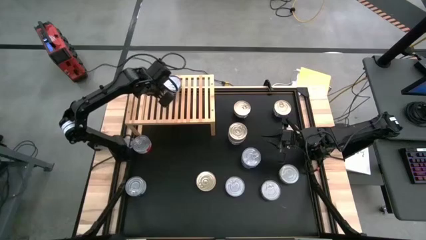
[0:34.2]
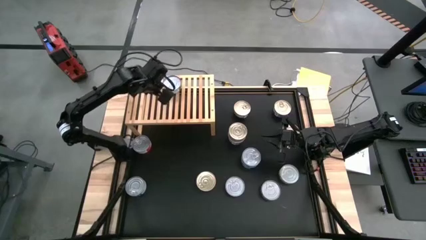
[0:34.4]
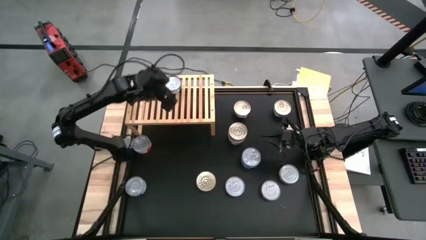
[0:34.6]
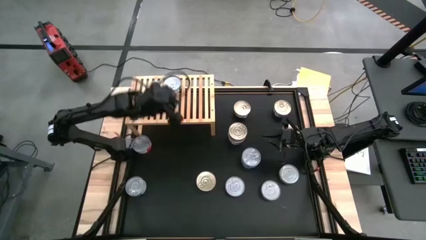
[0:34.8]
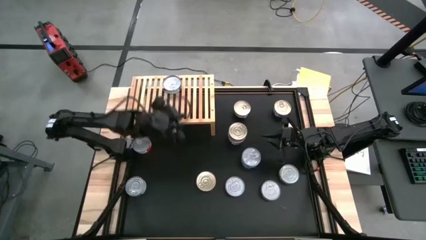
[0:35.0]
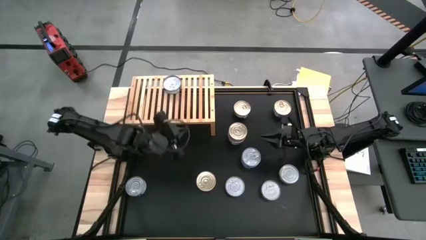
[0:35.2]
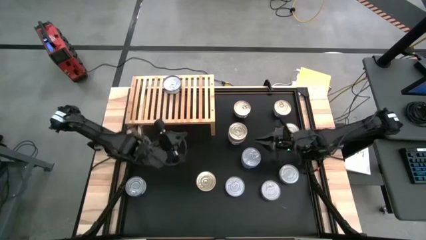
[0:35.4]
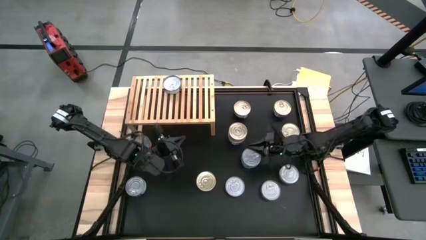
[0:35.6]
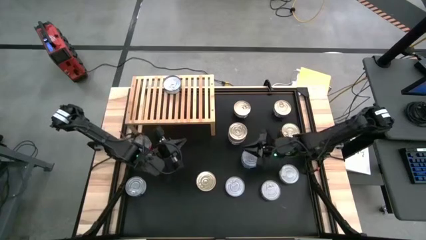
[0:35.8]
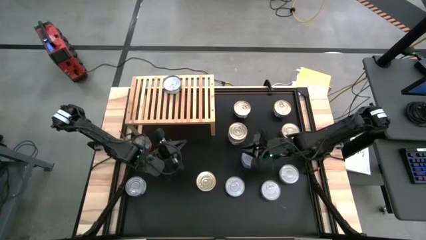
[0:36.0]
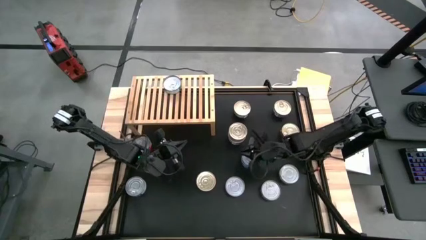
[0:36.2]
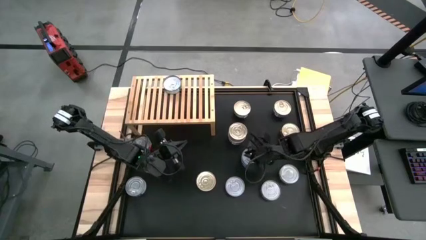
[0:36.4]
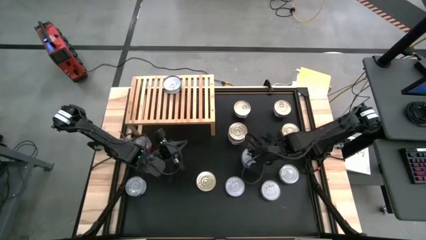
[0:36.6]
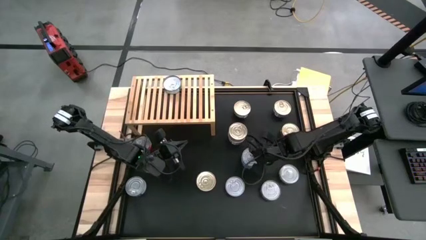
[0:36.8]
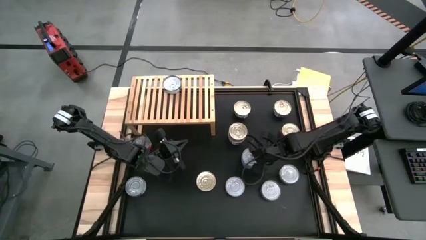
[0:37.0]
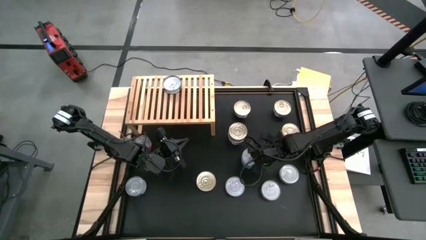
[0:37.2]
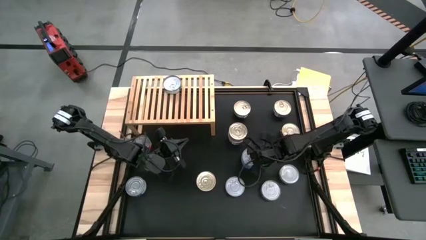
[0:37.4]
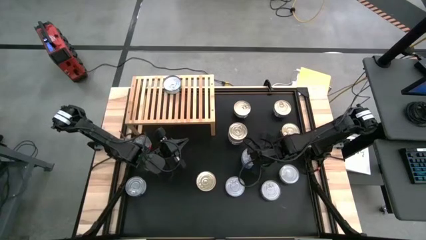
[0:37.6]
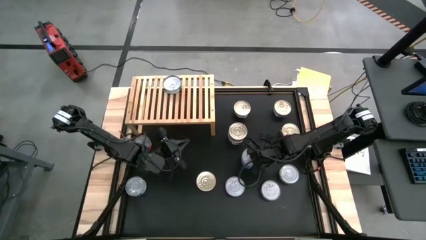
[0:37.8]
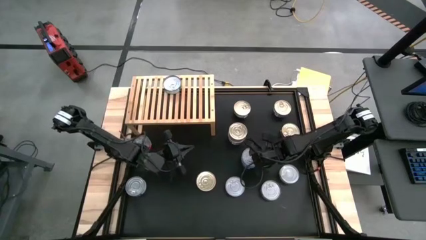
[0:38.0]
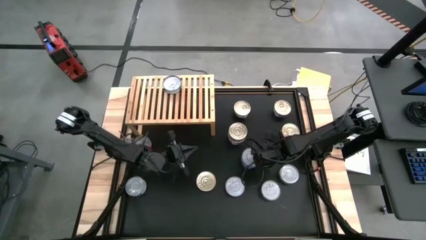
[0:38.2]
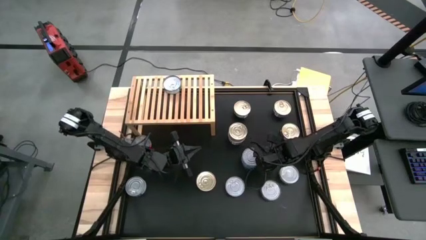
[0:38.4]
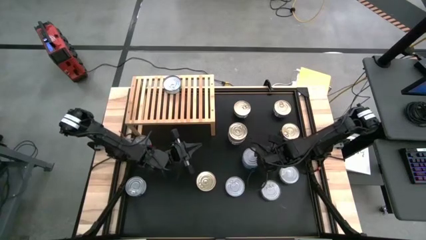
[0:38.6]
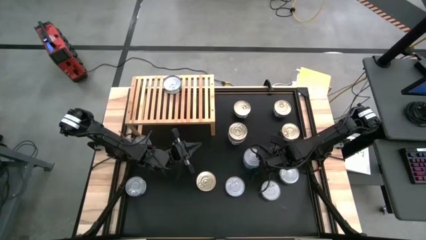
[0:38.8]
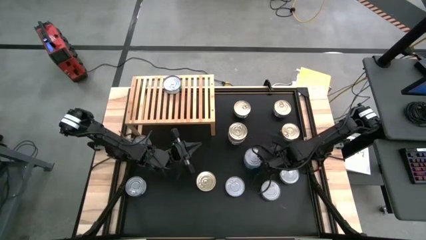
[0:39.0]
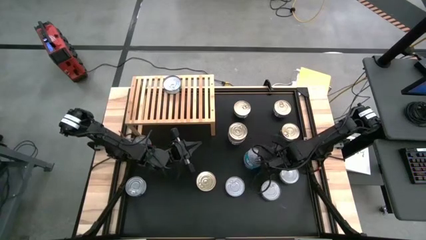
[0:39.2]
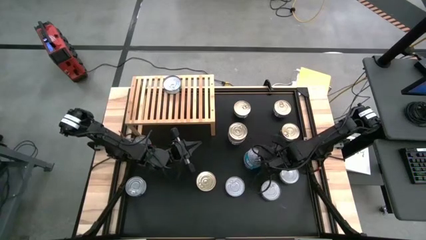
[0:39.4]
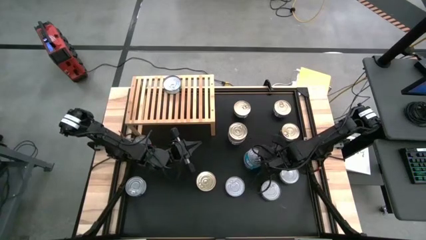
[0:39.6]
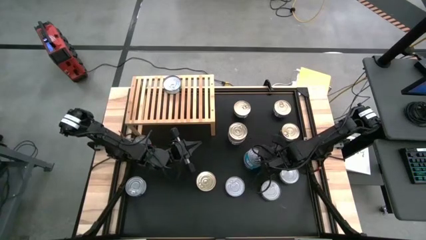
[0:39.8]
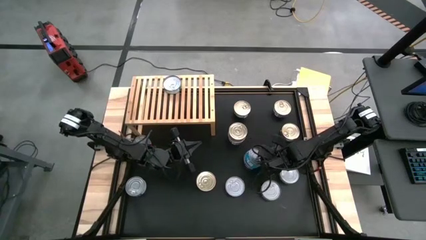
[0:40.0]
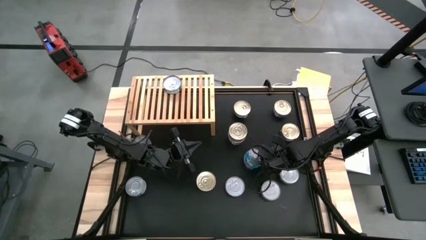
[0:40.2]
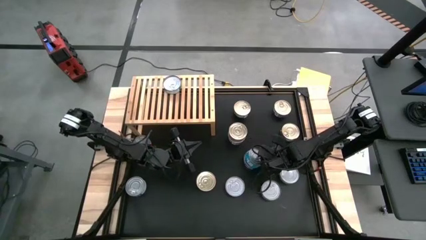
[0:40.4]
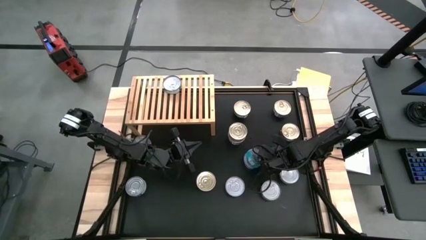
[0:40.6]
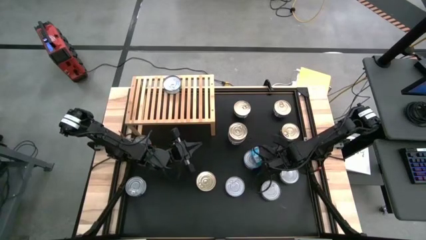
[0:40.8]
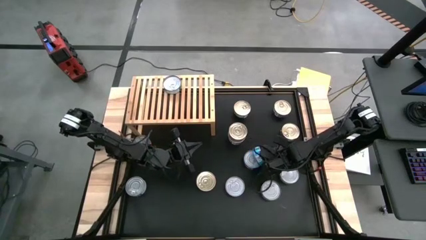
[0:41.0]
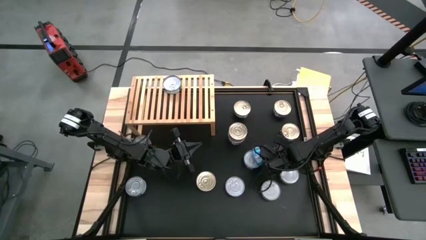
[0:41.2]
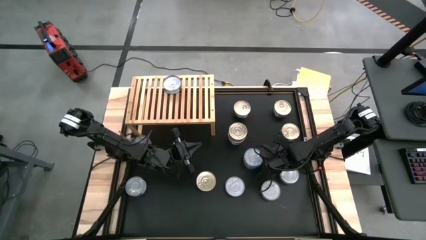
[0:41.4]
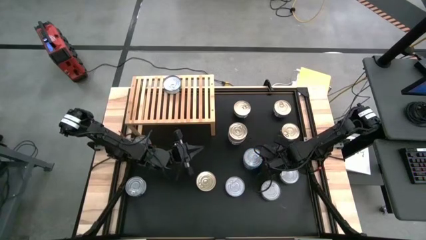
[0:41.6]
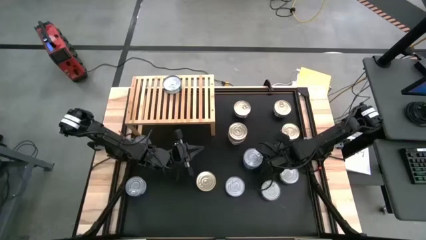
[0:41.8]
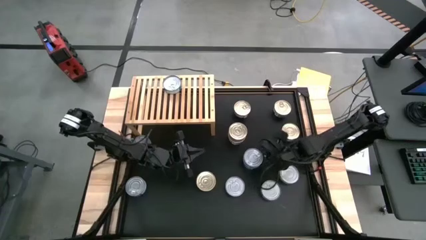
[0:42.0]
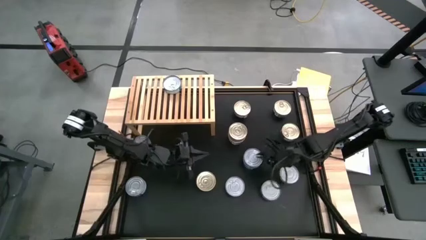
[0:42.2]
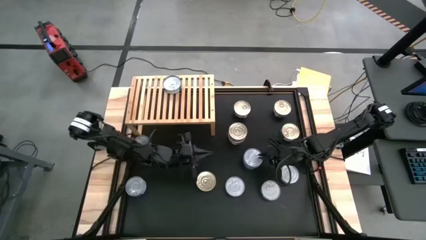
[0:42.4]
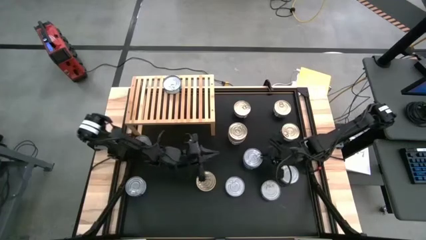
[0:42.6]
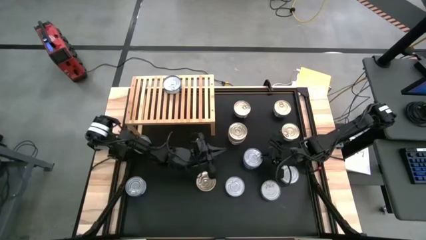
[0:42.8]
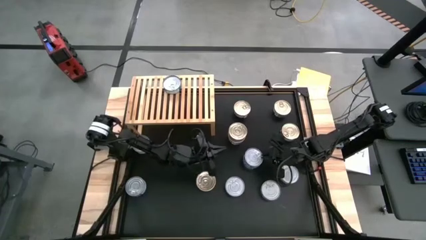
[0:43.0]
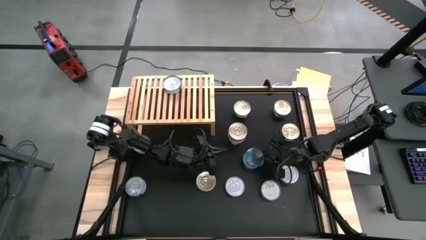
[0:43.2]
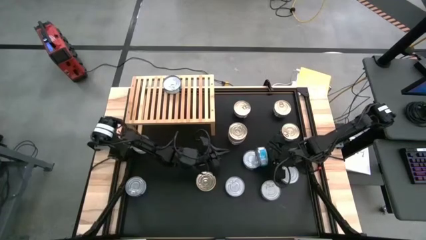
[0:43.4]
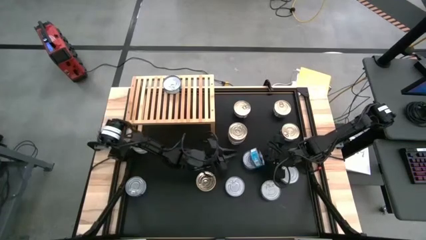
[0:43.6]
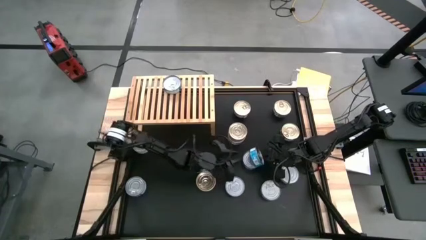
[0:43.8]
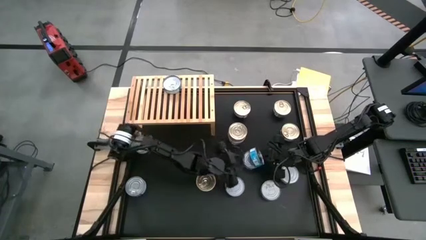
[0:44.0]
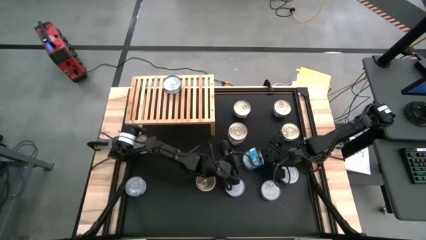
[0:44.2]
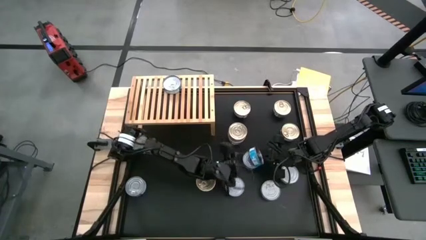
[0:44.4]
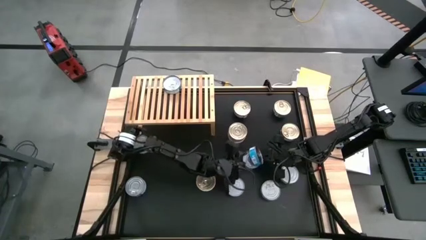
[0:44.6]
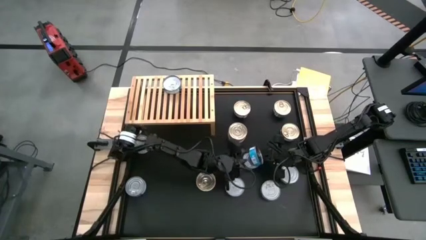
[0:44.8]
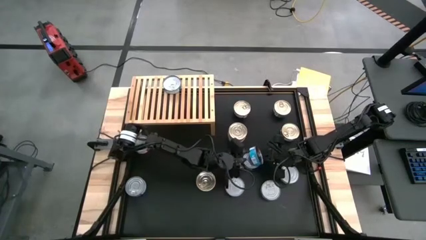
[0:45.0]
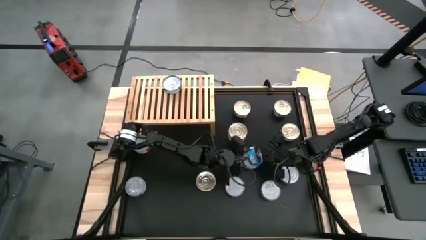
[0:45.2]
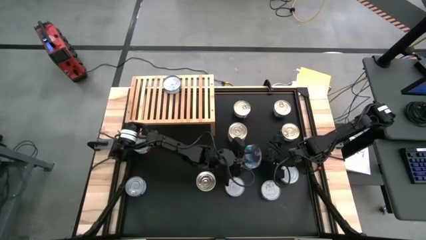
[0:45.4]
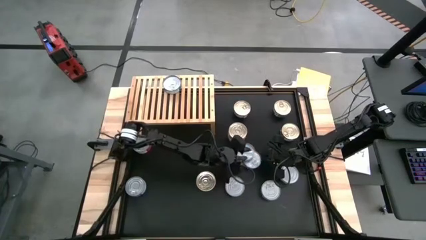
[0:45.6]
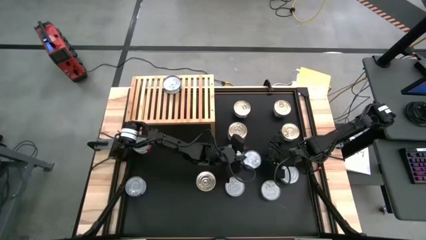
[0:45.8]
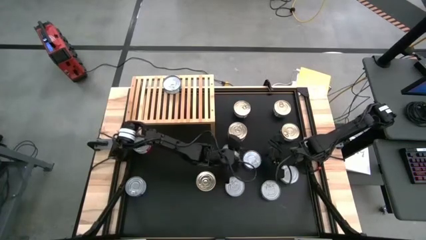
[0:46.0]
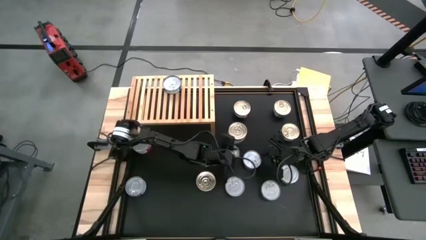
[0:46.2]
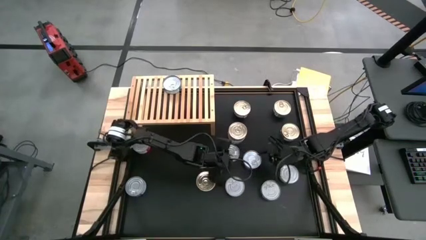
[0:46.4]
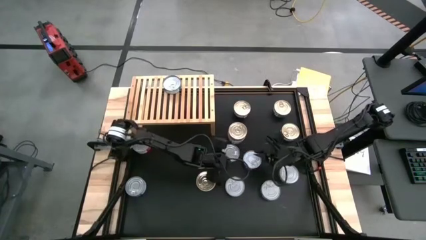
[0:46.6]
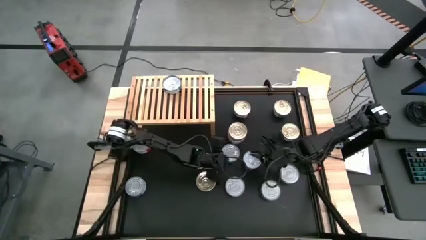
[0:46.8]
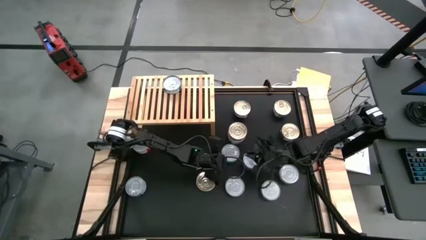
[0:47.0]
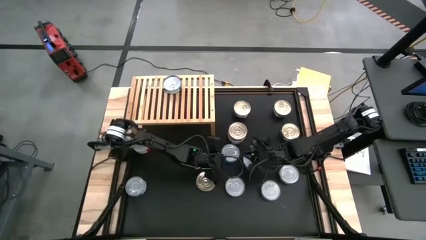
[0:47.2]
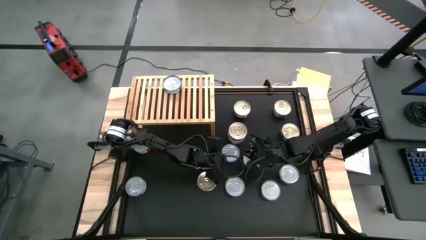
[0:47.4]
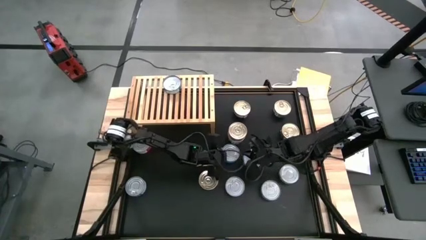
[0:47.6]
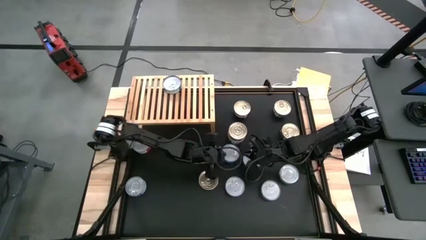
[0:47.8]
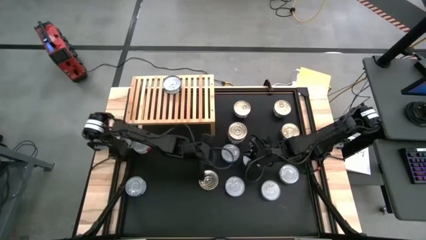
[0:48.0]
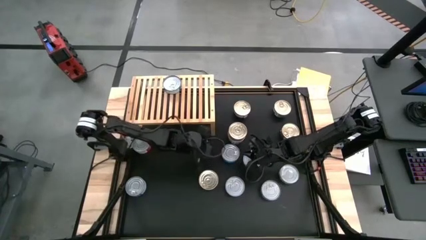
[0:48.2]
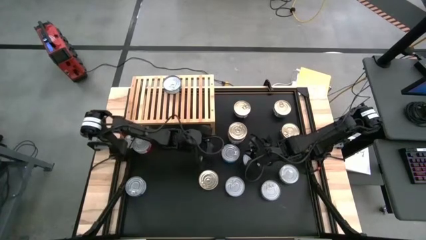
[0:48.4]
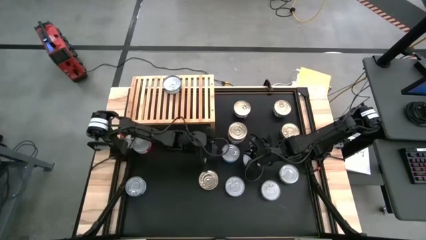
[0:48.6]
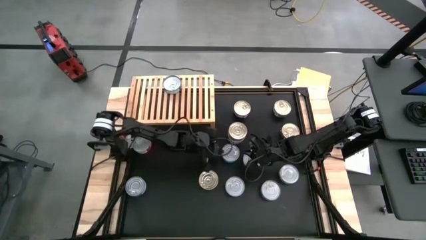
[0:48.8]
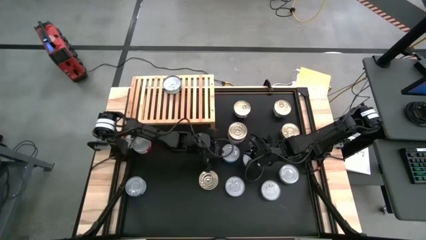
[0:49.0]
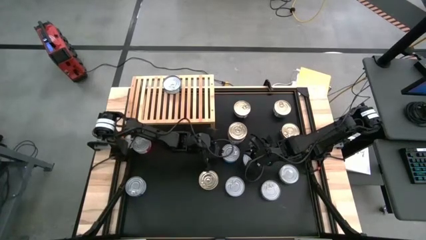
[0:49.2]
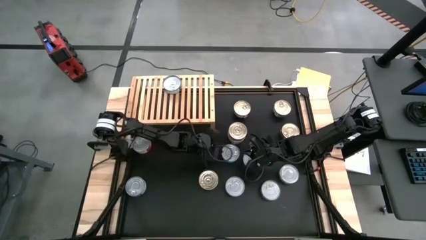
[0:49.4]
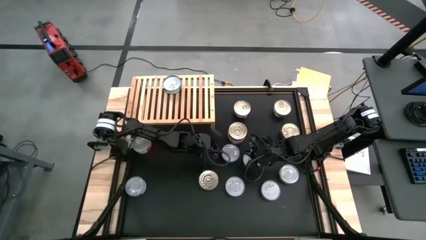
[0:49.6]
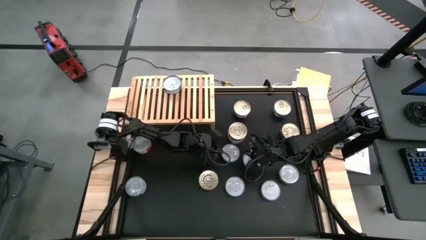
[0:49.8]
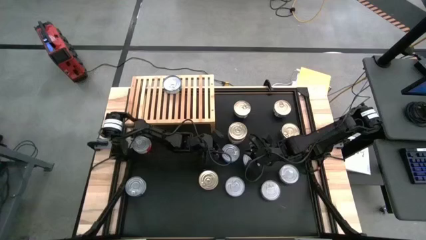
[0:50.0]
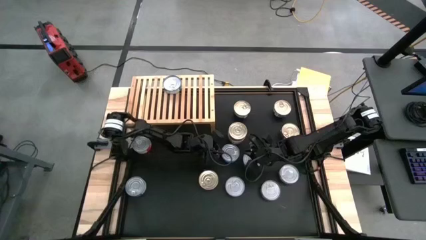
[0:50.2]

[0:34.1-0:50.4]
Task: Stack canned seafood by type on shelf
Put the yellow blue tuna can on the shelf
